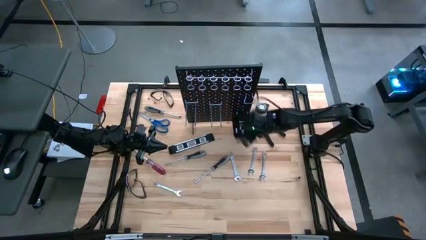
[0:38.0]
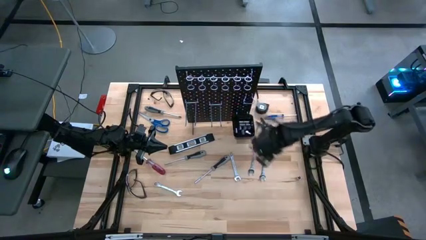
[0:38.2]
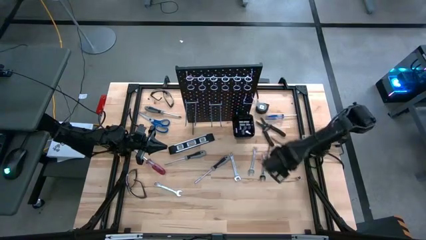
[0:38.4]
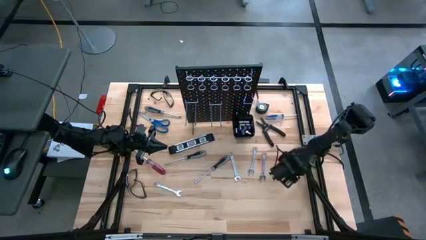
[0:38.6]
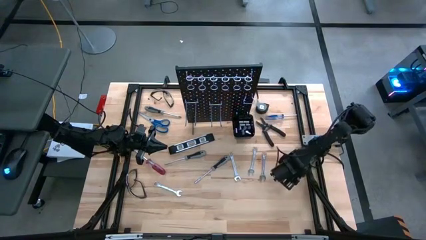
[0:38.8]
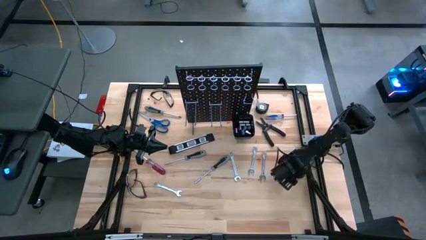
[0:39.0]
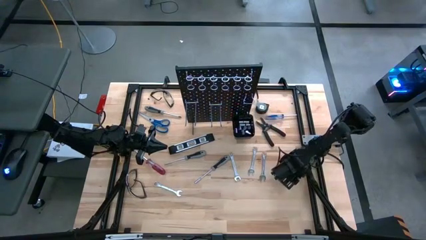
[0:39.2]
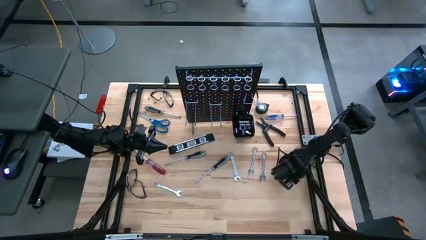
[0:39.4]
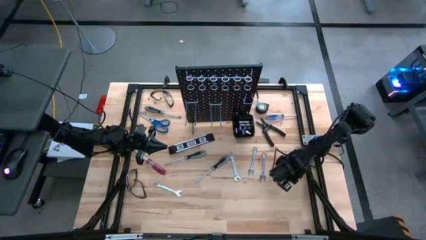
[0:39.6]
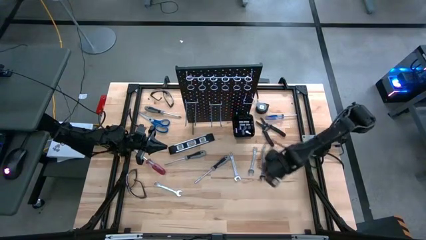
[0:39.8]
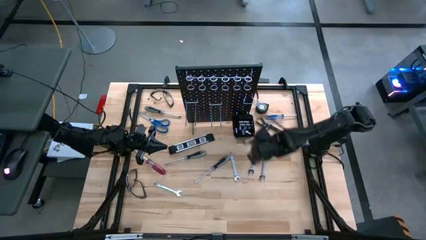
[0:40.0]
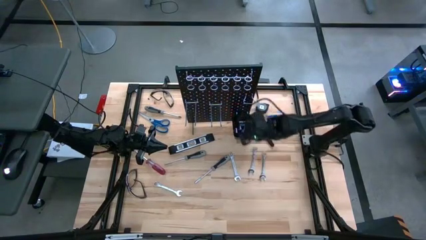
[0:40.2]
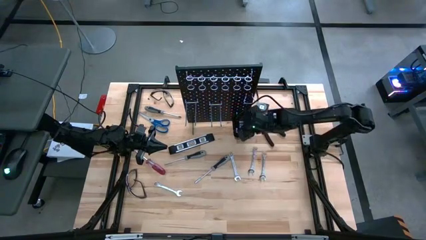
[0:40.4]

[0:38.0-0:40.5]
Task: Hang tools onto peg board
Put the silver socket in the black bin on the pegboard

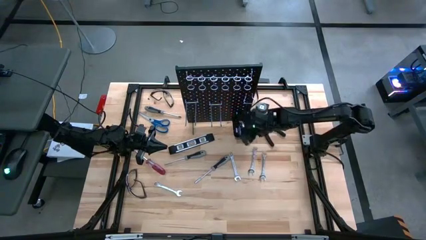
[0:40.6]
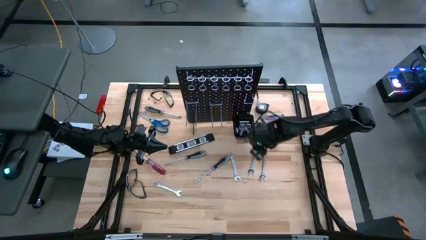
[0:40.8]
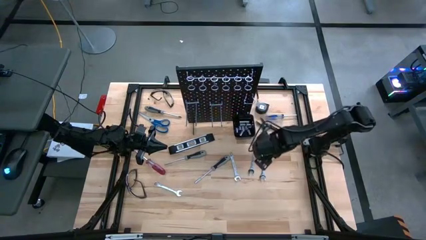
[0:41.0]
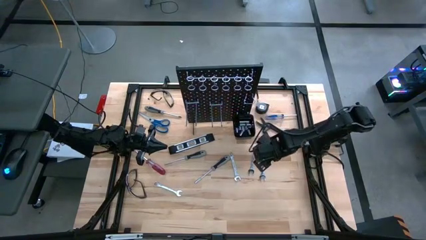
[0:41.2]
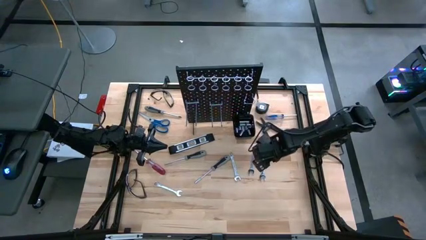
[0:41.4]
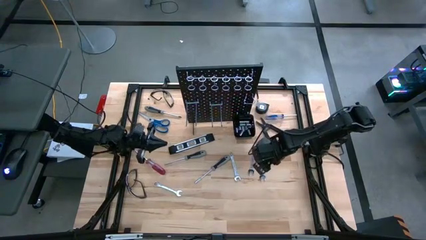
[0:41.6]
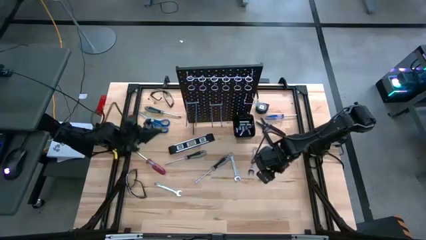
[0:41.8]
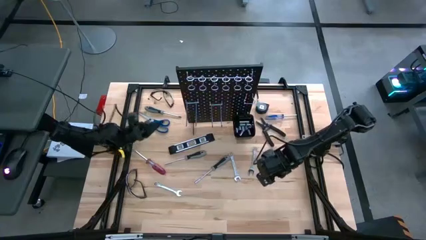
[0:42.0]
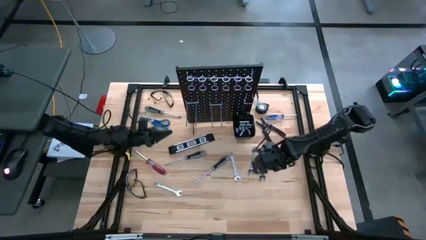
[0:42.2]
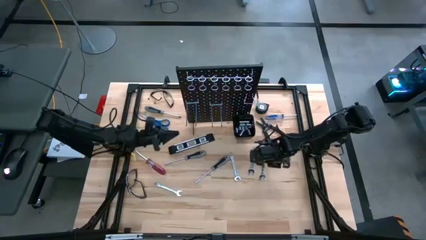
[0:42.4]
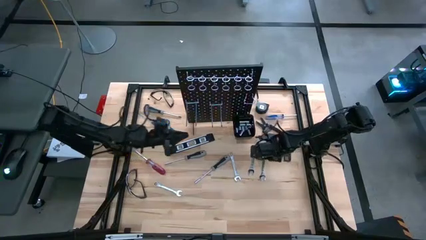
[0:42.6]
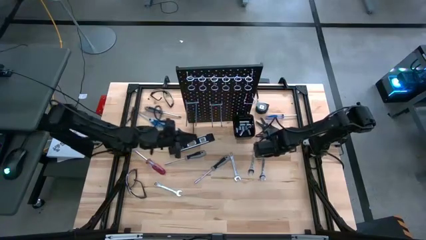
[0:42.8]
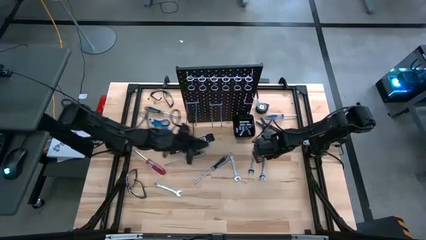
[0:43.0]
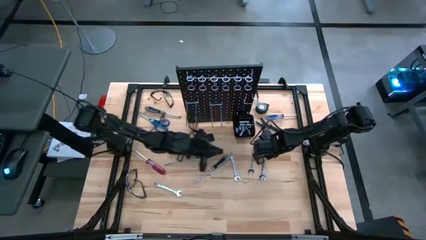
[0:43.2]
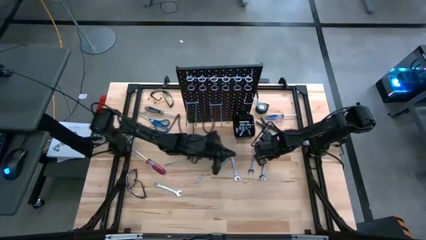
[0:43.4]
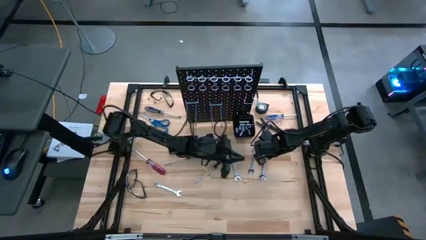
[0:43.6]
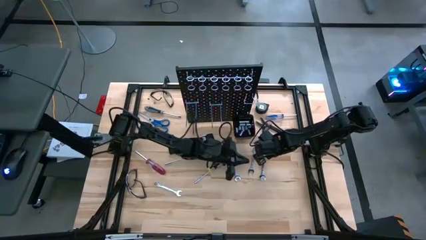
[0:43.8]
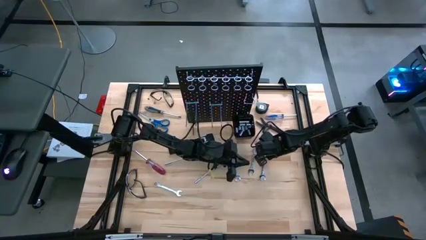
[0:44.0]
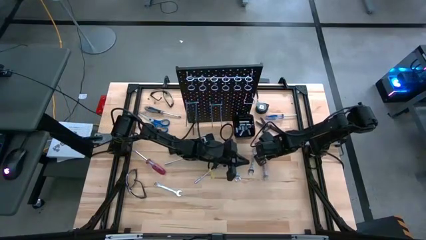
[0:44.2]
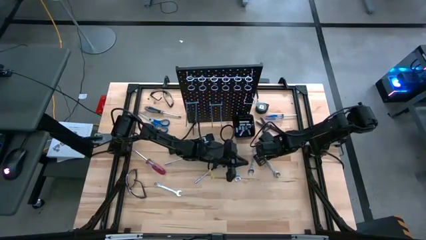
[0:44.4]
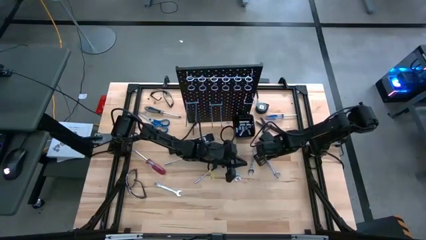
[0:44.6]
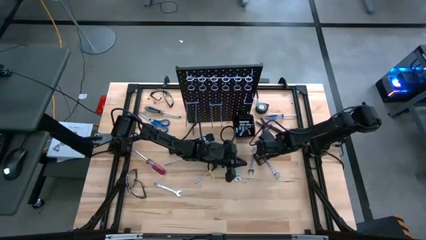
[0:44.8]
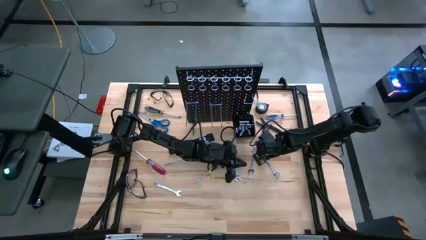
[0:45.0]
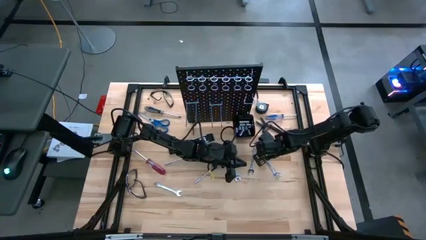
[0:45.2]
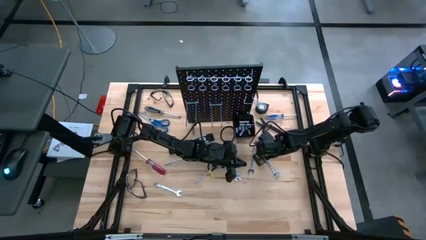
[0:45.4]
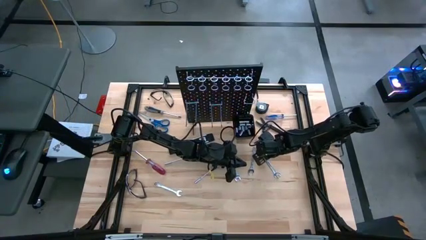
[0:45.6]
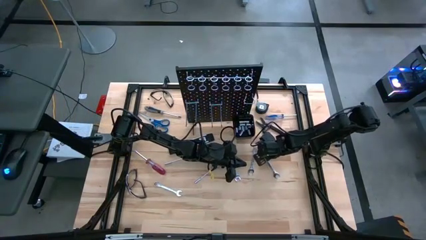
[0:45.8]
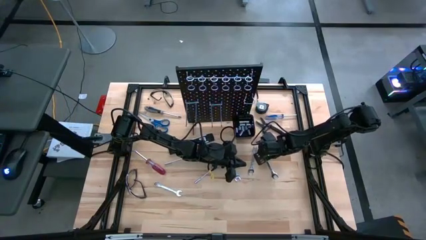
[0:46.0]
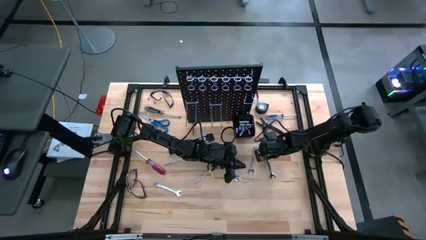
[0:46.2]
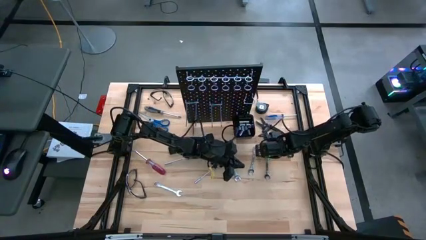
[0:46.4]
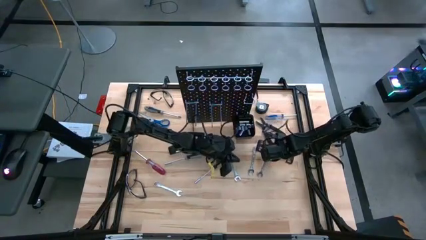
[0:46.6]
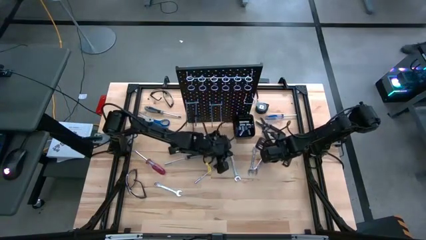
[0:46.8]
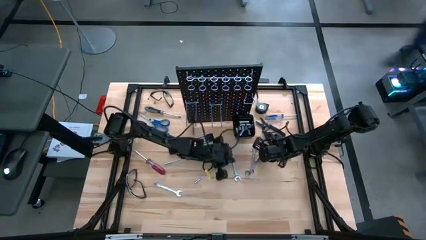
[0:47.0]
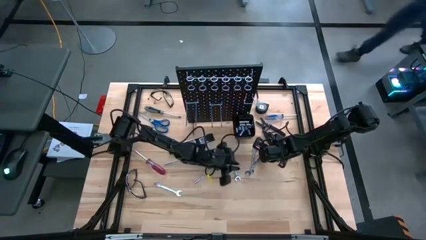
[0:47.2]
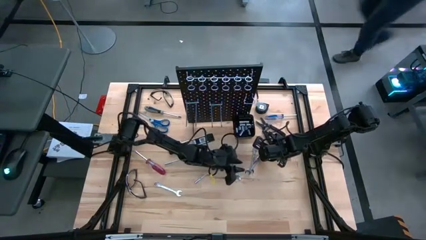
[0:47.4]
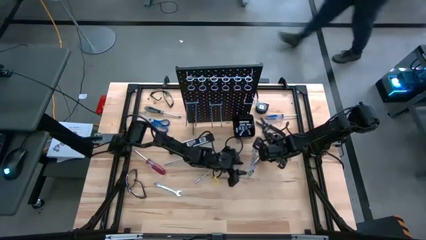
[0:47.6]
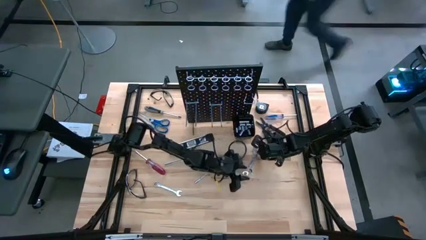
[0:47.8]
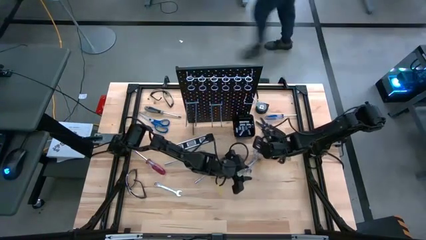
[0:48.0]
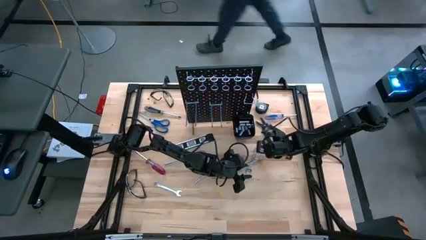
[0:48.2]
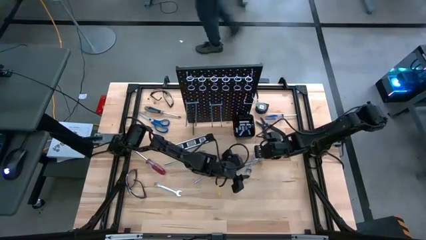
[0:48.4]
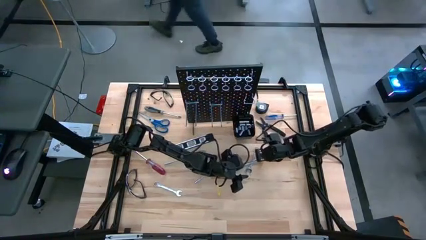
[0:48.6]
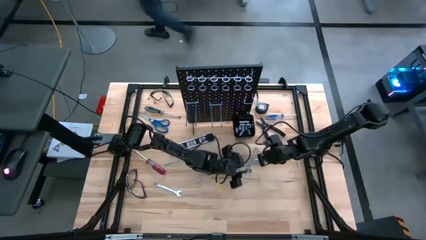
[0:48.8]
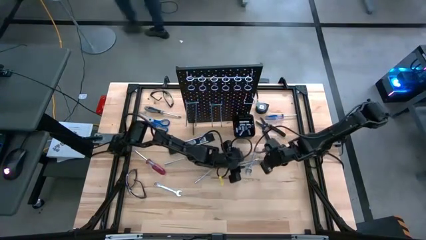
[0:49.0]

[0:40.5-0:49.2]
Hang the silver wrench on the pegboard

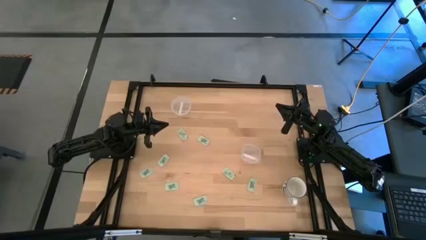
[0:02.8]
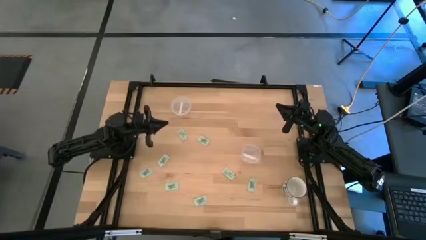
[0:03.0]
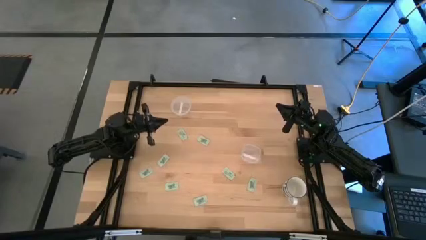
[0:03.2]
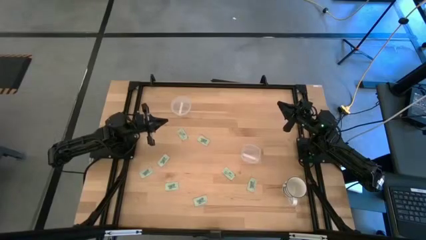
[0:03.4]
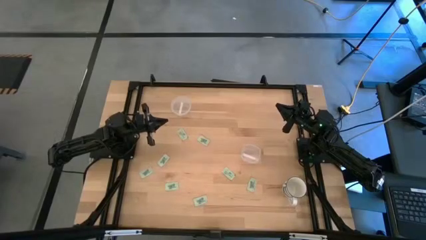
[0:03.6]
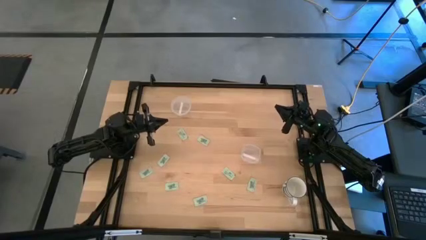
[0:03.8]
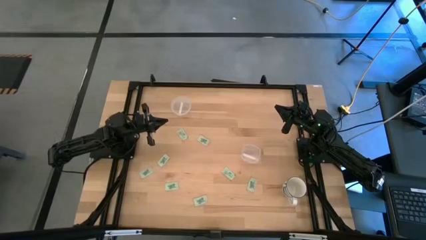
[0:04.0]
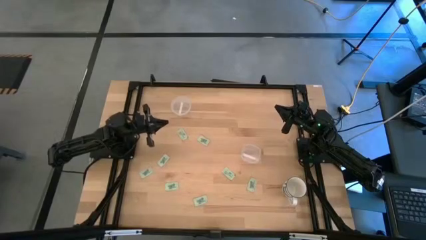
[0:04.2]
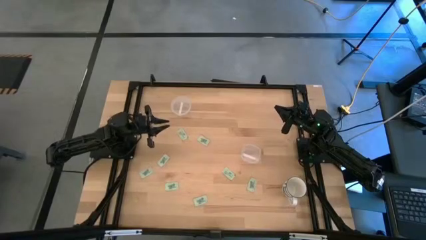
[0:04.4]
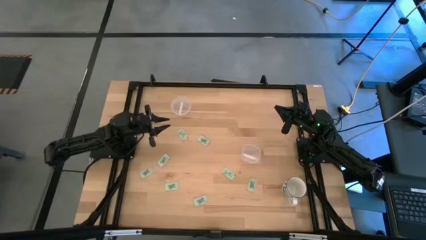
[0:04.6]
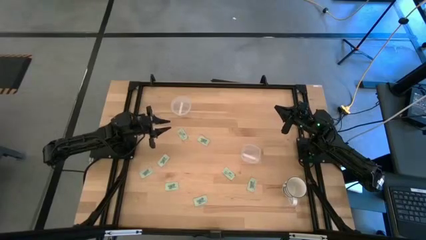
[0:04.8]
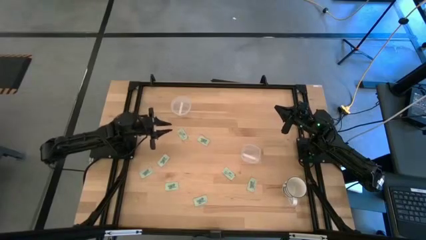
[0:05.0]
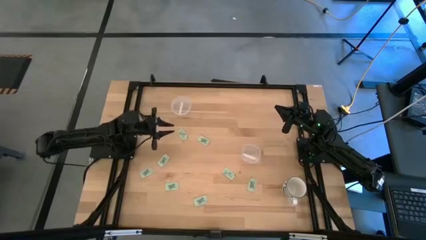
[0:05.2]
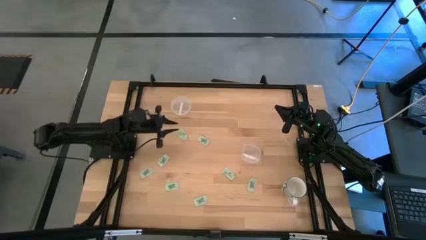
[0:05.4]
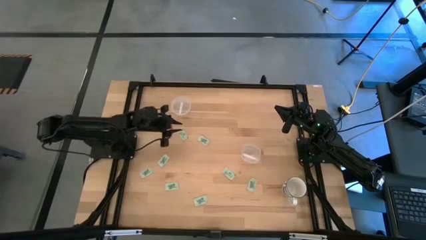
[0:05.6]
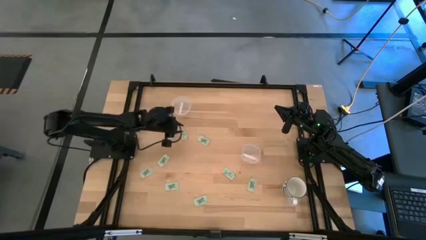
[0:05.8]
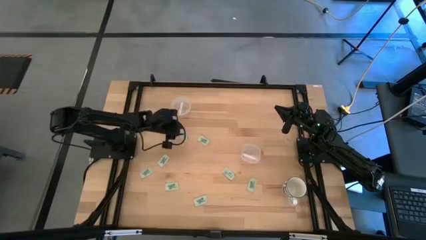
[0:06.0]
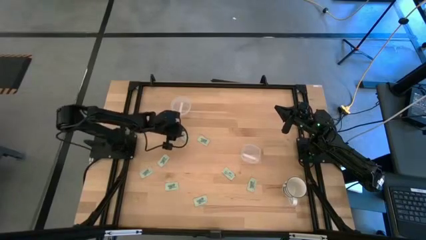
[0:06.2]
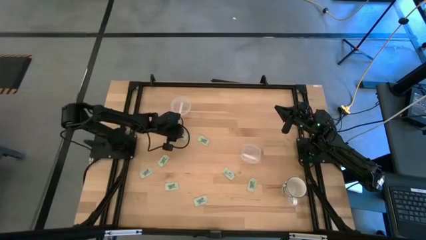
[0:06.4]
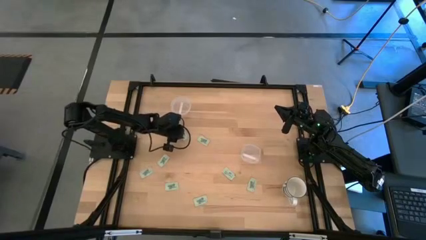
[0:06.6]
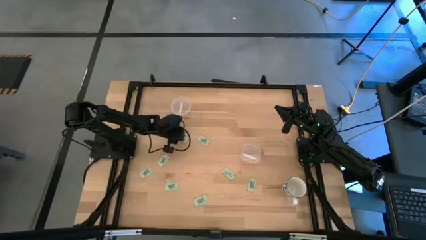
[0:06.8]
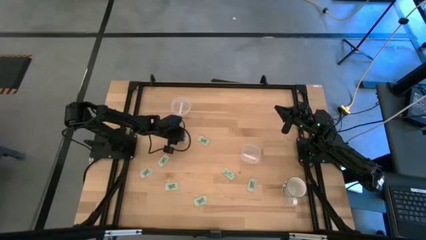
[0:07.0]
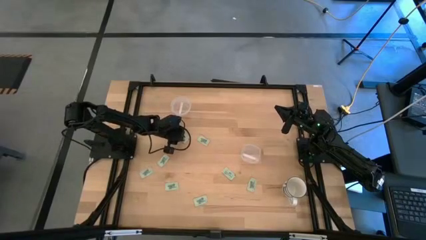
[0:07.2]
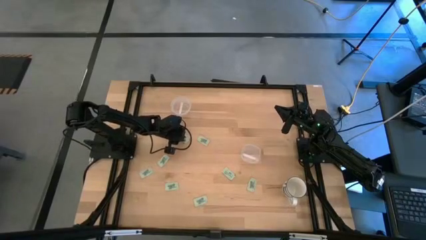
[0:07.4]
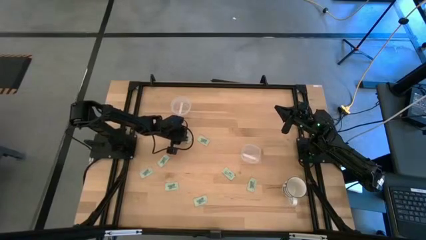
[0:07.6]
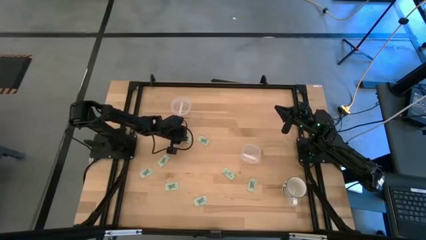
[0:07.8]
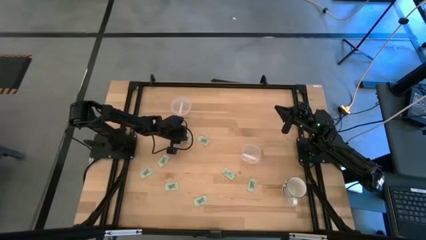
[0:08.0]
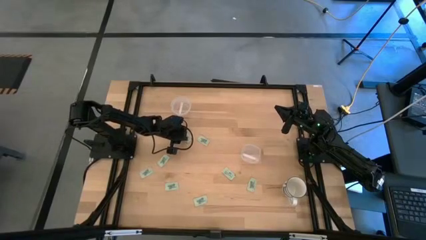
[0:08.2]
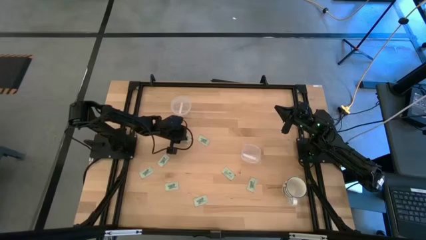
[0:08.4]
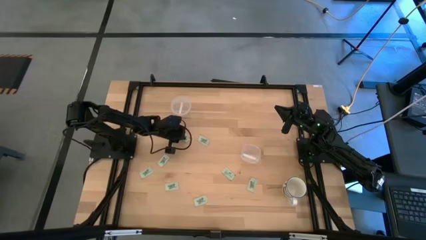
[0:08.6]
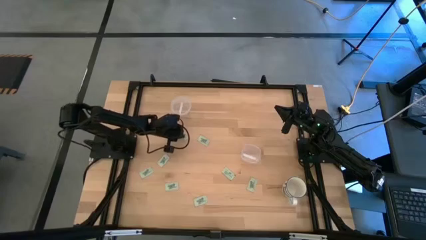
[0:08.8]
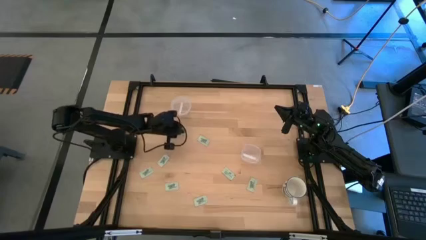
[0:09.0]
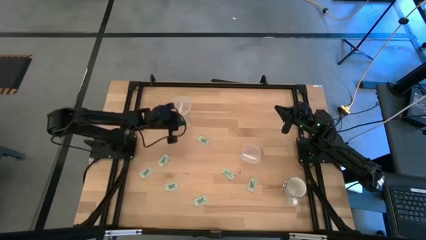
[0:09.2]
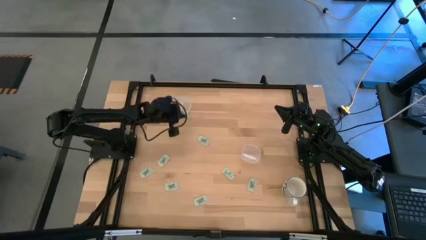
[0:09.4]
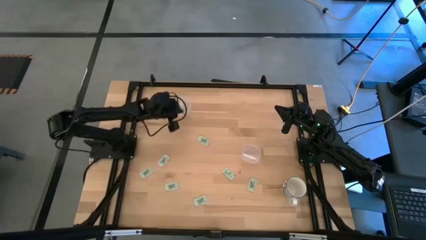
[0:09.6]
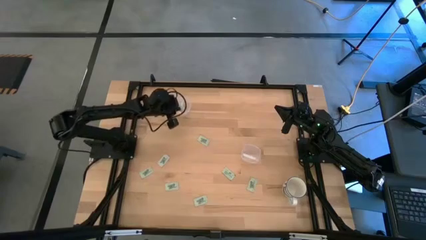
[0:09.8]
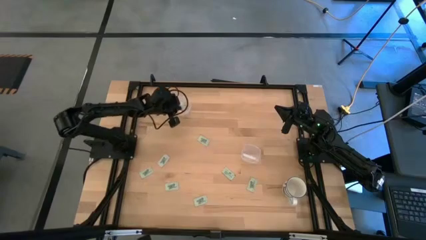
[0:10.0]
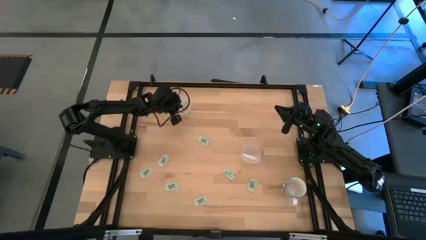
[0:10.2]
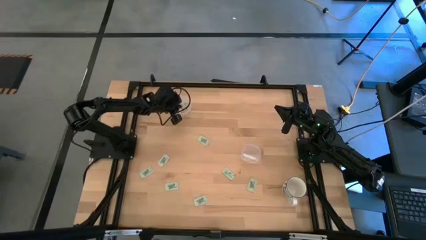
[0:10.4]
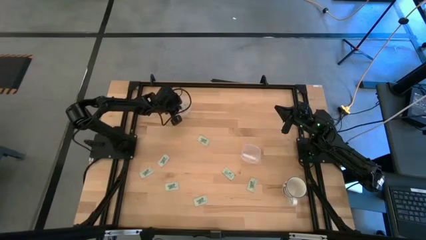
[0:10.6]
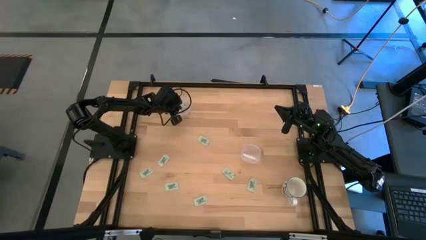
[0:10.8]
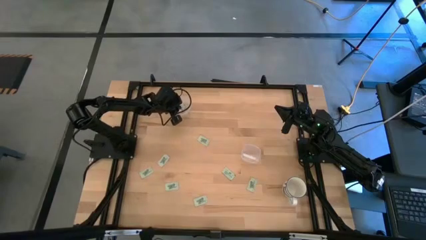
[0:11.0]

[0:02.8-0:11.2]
Task: Pick and place Stevia / Truvia into bins
Put the stevia packet into the top transparent container
